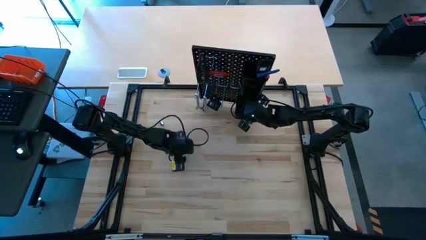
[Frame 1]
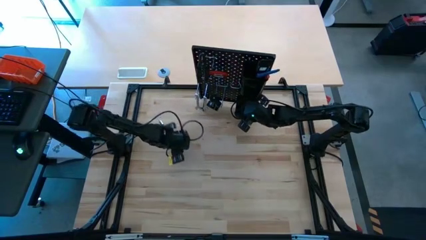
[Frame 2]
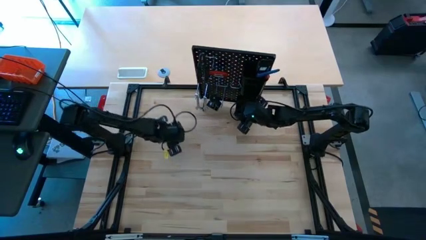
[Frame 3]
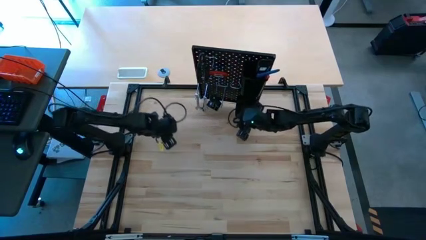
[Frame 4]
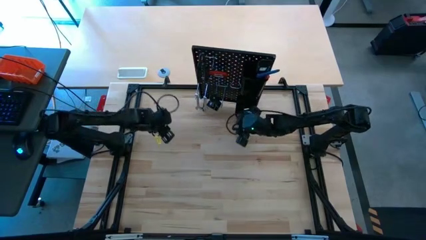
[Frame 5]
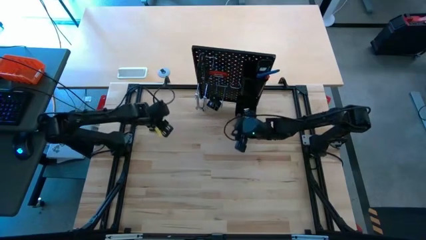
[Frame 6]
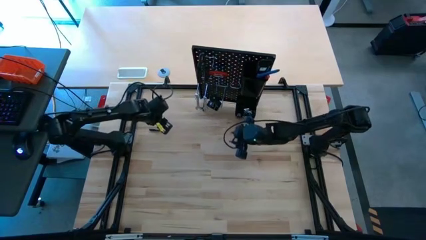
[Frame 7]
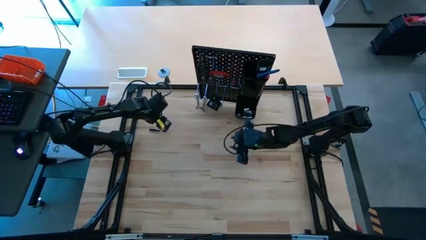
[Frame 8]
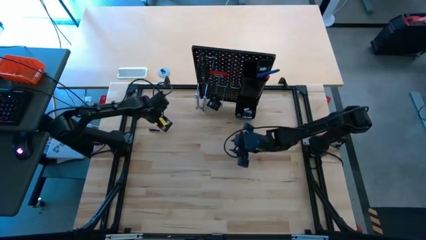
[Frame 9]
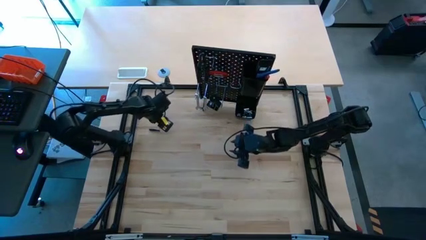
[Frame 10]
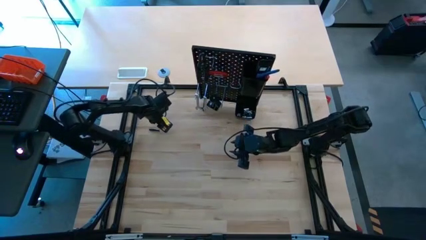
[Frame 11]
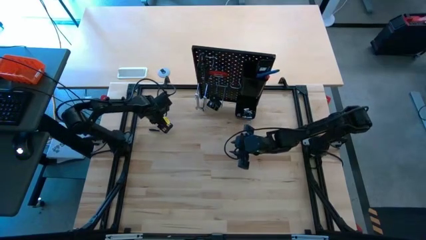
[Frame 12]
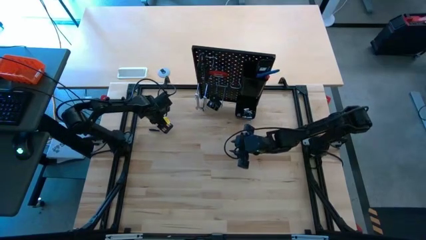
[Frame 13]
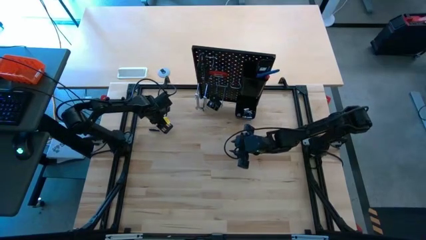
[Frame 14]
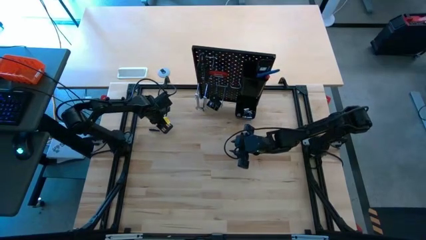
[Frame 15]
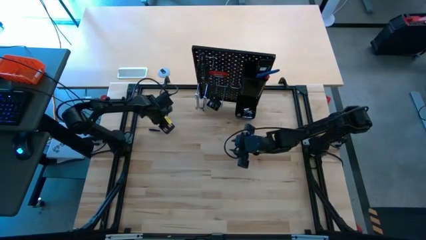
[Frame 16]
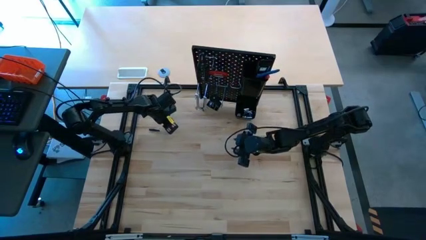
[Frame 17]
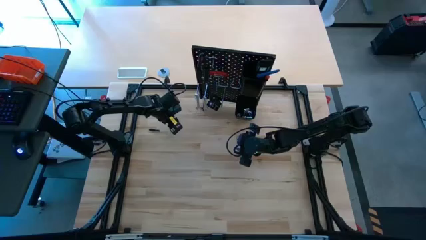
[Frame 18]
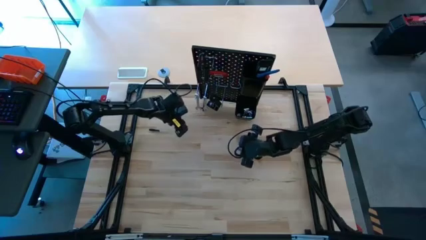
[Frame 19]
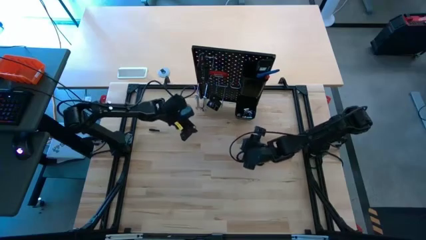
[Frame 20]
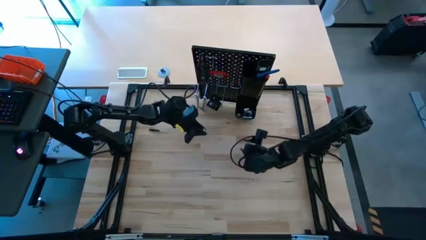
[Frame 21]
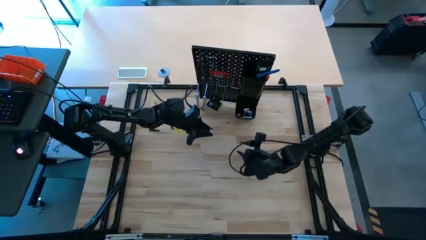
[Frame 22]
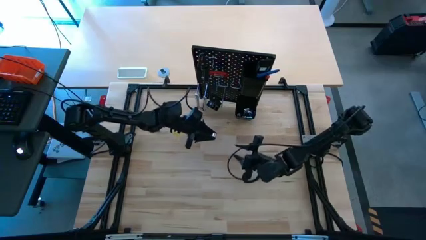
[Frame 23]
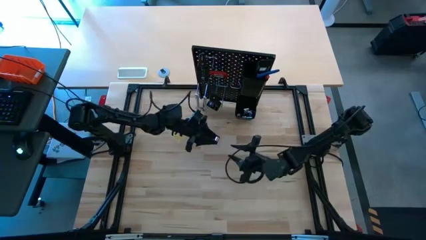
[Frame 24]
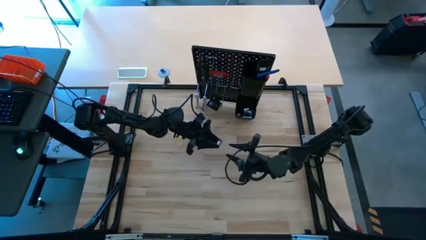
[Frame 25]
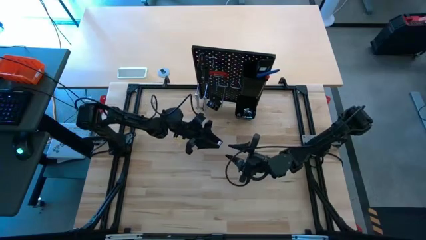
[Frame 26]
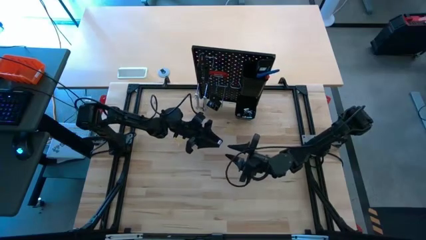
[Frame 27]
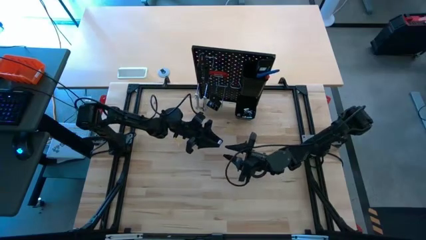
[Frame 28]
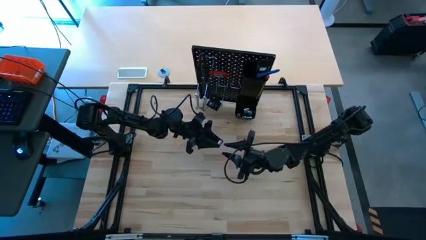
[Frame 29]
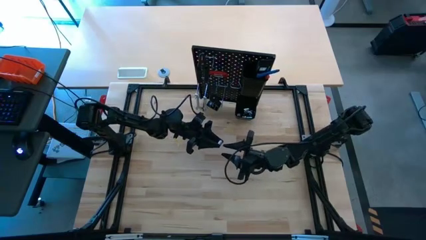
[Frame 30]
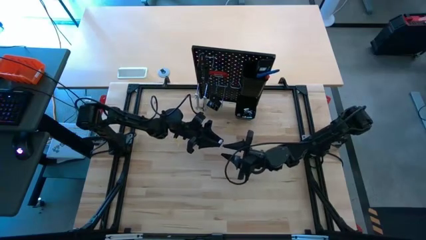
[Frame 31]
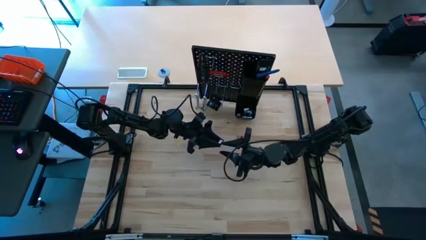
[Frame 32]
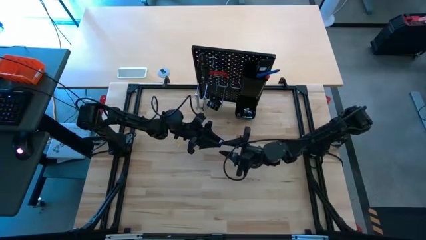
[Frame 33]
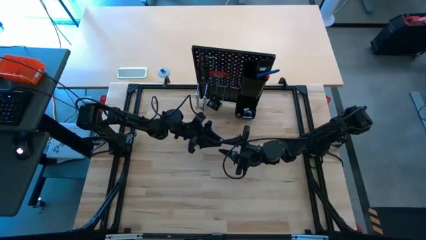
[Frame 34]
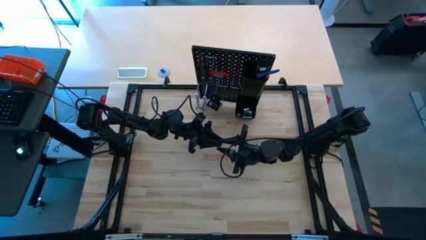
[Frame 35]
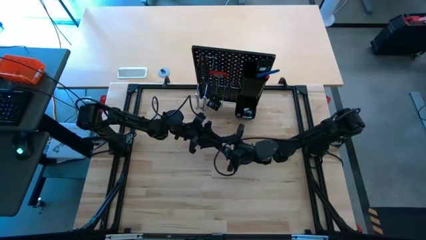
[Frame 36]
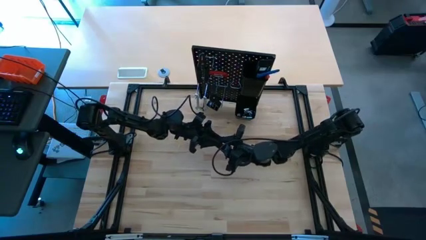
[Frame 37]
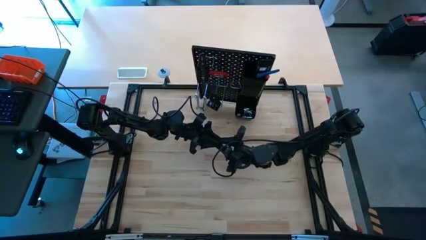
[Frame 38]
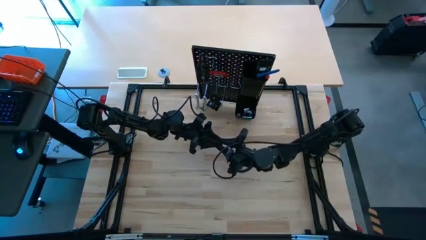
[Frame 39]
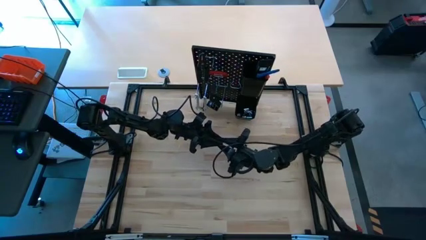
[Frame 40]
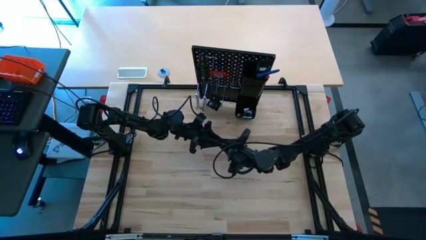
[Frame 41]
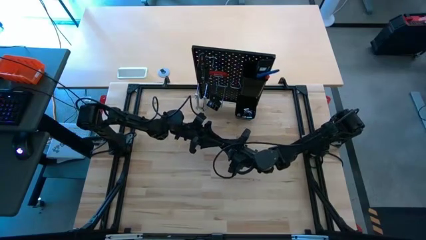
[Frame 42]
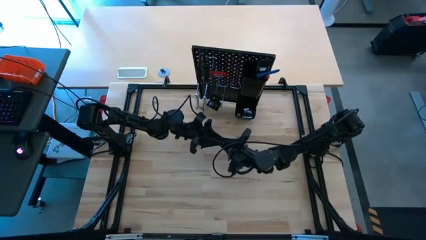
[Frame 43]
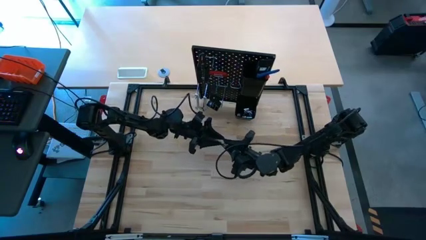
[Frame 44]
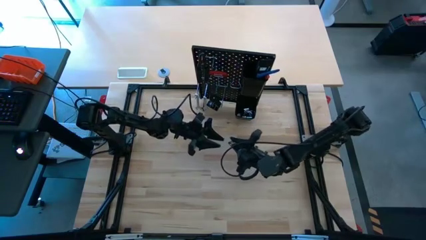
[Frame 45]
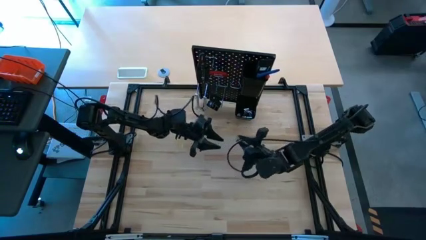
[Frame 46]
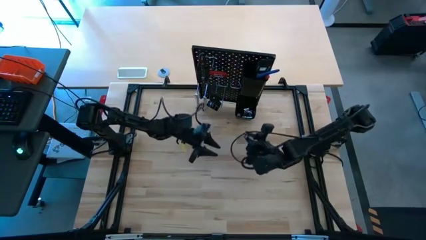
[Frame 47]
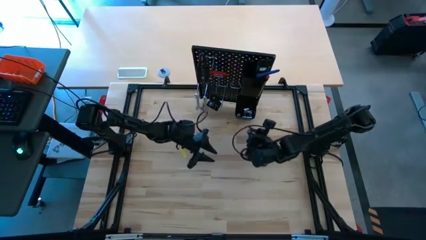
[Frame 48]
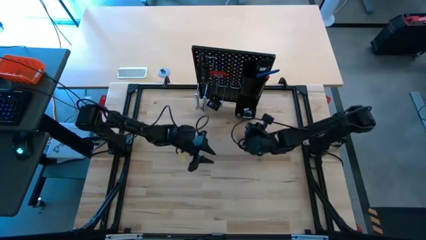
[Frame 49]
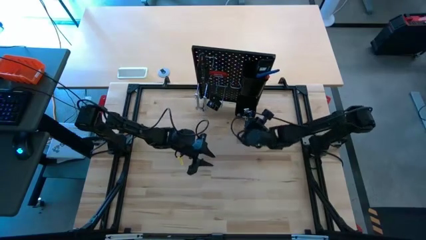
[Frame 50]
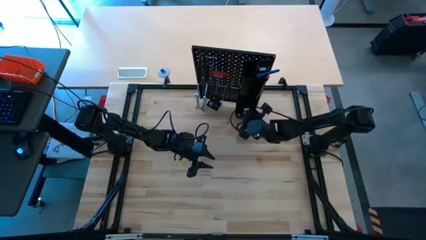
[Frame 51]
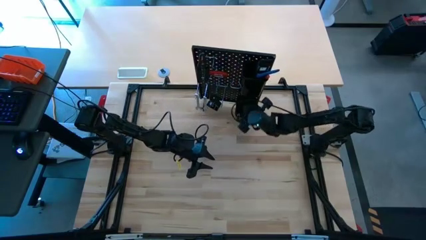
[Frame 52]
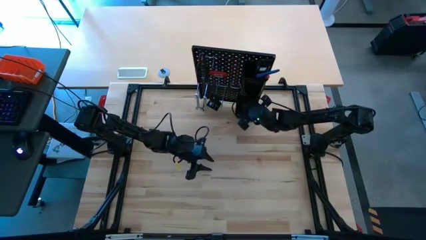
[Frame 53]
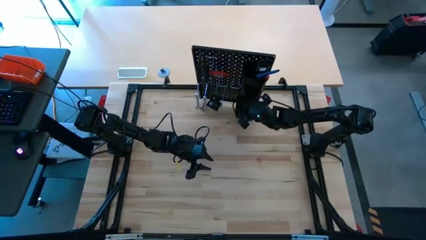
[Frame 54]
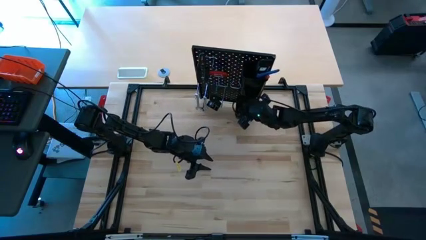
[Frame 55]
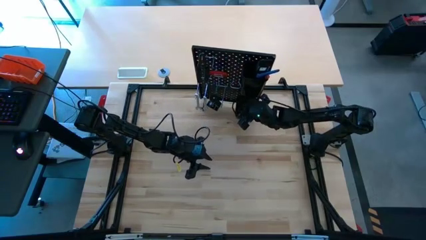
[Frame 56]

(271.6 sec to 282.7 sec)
Task: Hang tools onto peg board
Put the socket into the bottom black bin on the peg board

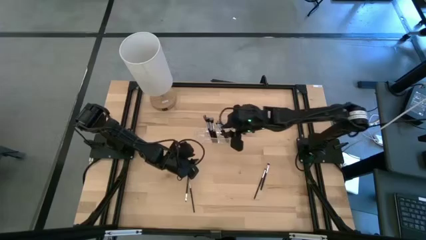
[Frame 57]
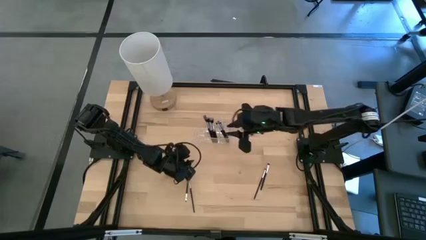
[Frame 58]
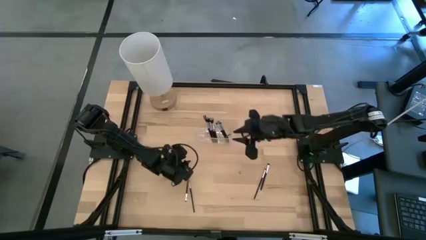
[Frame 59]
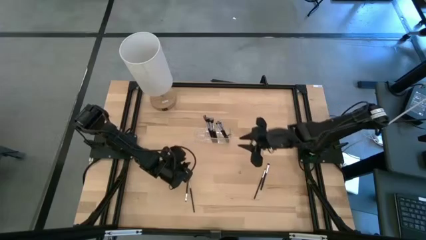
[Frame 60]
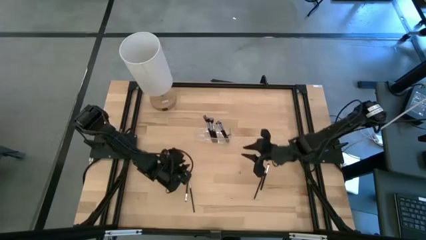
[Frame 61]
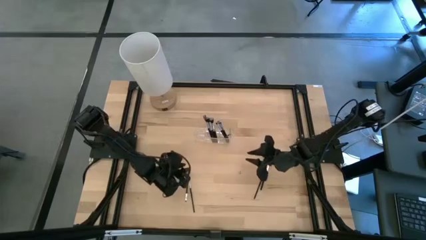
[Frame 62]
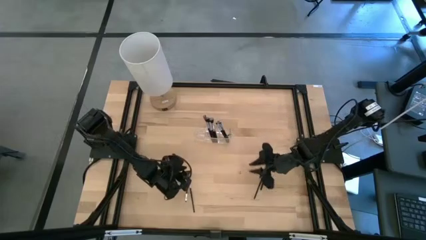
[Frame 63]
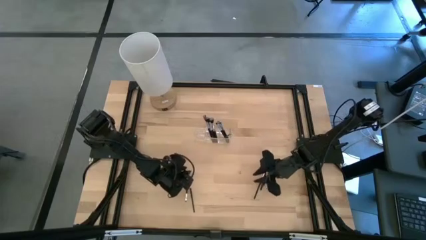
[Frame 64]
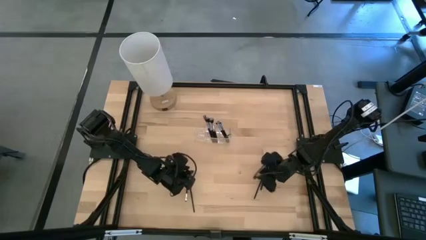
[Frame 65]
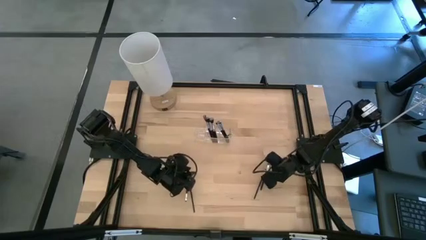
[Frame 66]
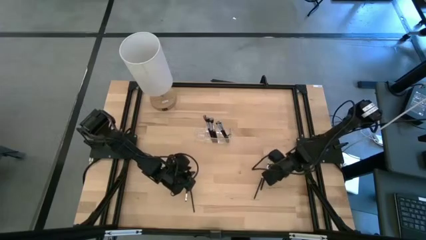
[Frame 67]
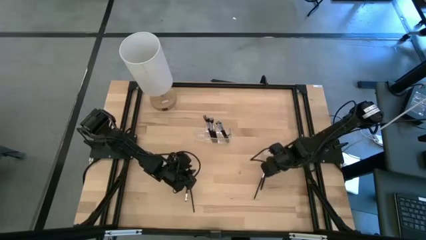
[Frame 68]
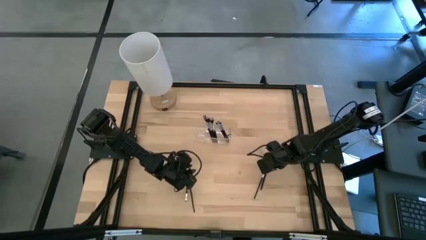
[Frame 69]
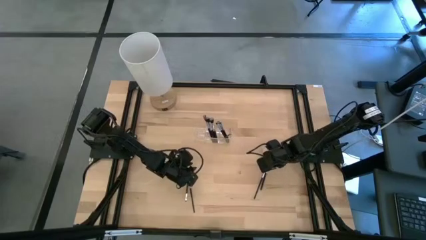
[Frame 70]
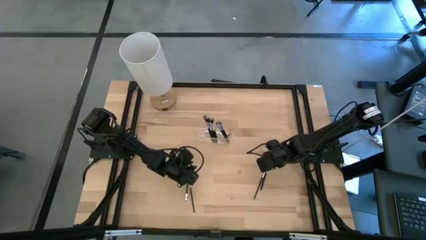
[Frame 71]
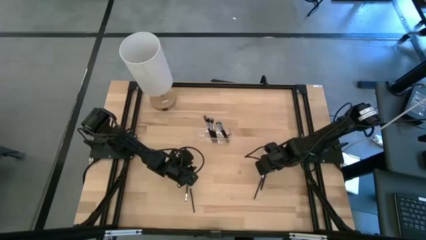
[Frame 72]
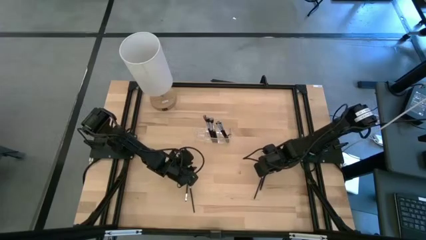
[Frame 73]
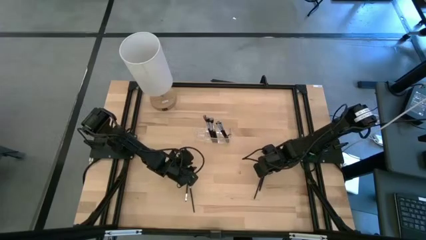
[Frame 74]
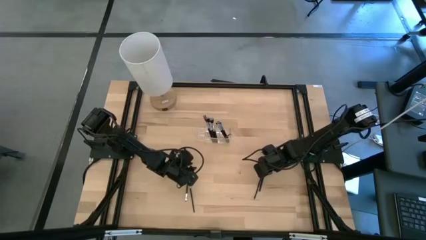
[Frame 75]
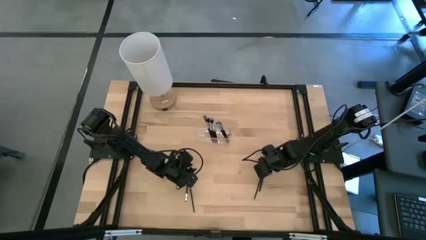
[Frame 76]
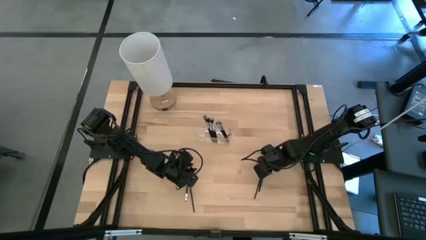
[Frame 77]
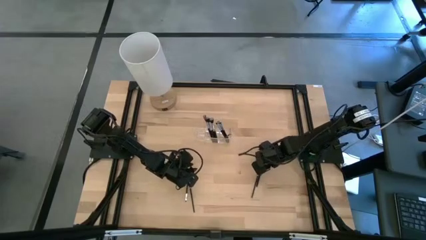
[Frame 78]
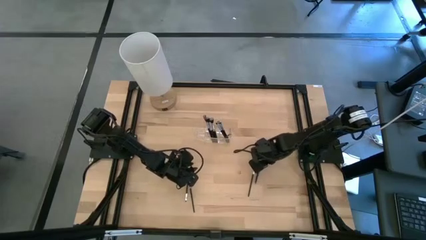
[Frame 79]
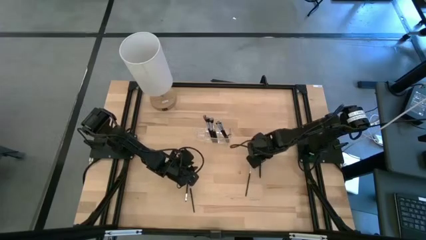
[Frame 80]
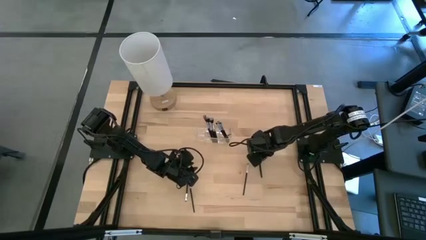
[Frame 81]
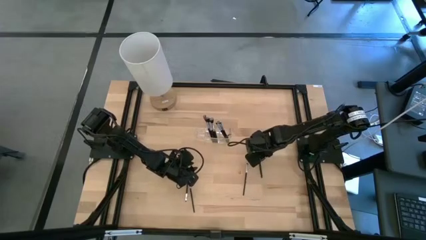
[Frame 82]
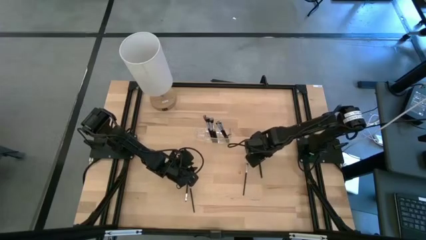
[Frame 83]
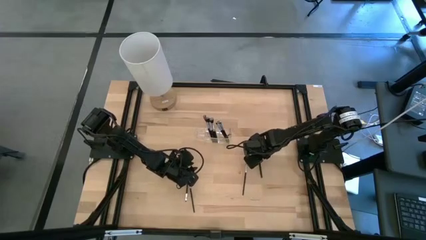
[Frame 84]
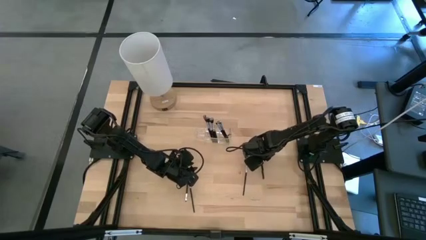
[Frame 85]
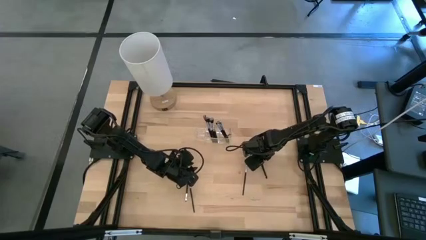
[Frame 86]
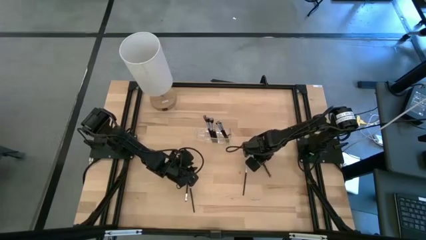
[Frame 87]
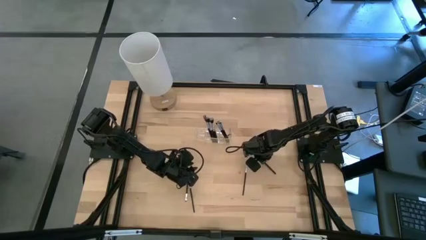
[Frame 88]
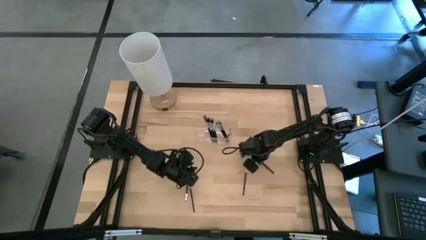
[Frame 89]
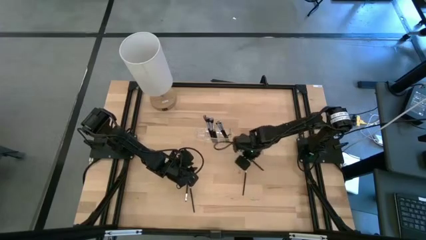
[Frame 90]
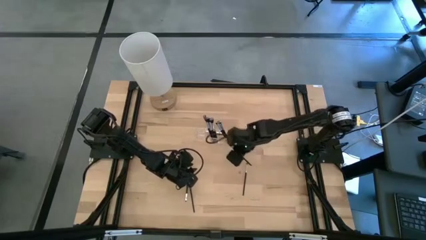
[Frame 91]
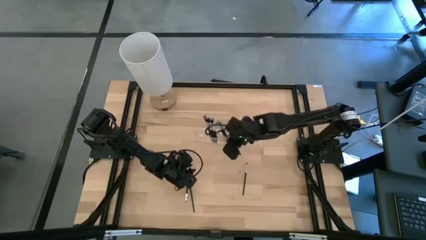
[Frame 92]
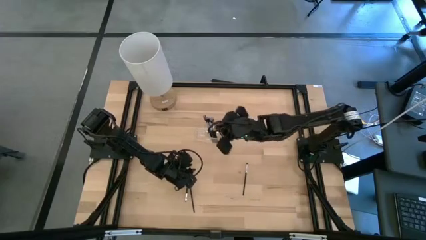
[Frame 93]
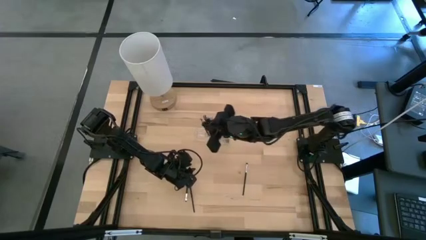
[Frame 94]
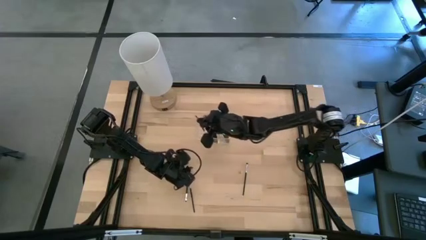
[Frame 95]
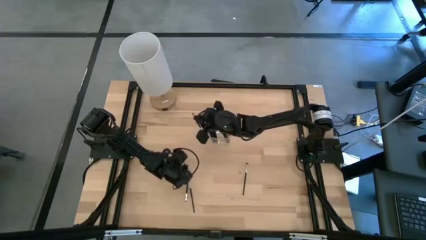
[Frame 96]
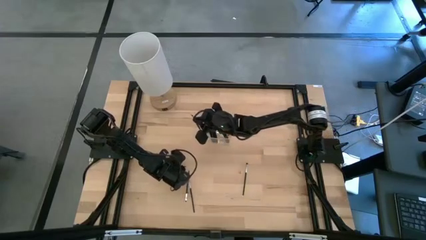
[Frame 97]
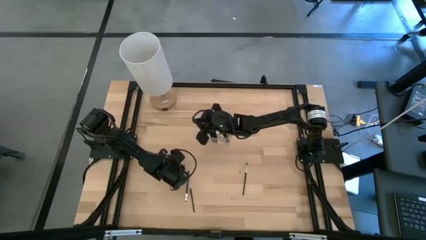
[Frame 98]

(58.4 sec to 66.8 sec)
Task: Put items in baskets/containers
Put the black eyeshadow brush into the transparent organizer
